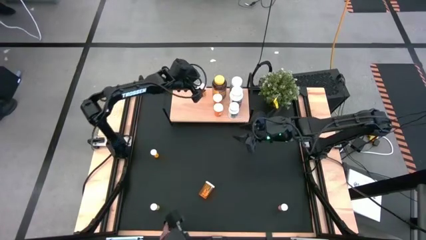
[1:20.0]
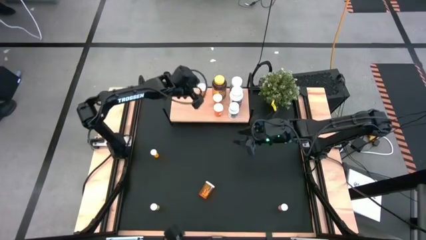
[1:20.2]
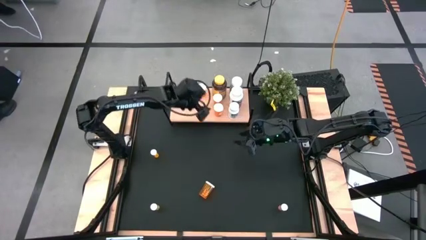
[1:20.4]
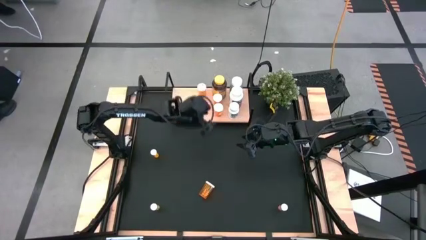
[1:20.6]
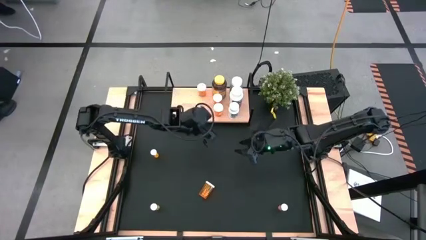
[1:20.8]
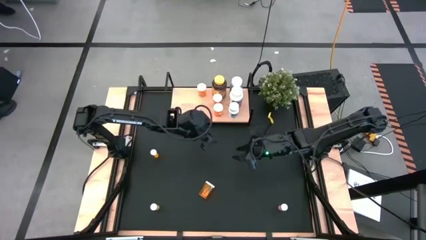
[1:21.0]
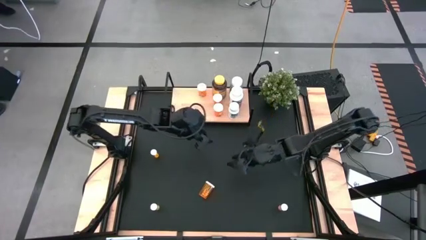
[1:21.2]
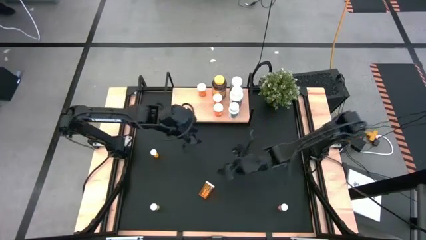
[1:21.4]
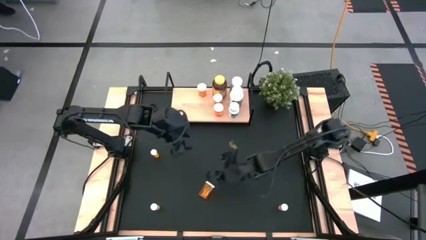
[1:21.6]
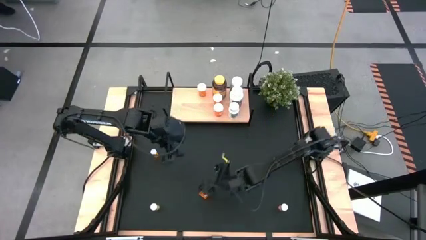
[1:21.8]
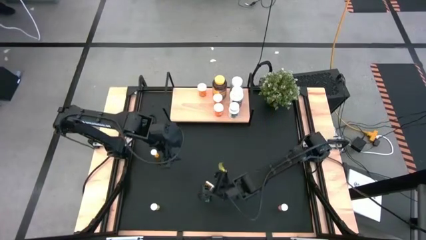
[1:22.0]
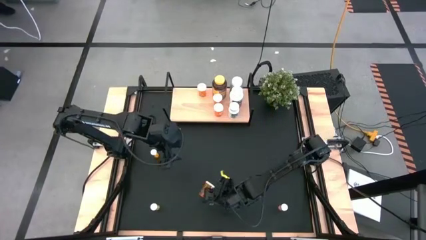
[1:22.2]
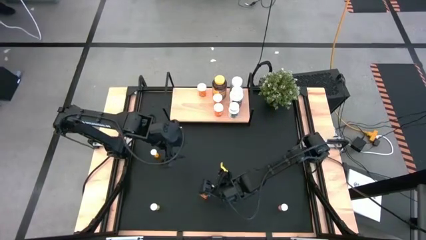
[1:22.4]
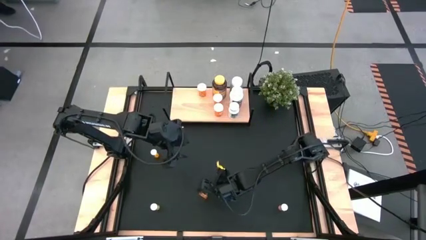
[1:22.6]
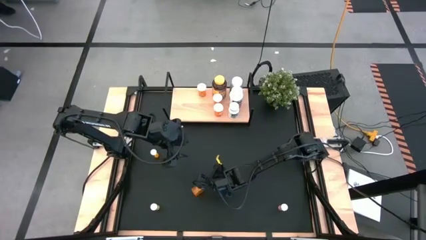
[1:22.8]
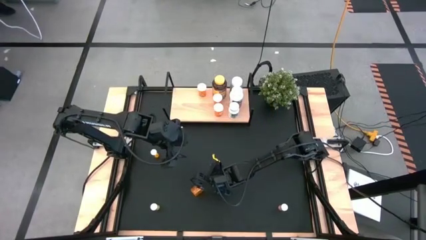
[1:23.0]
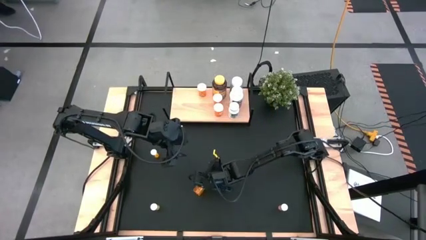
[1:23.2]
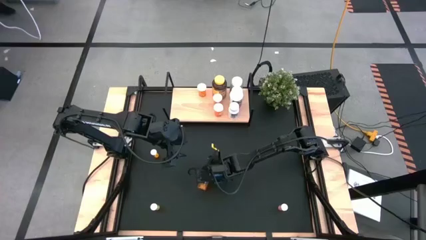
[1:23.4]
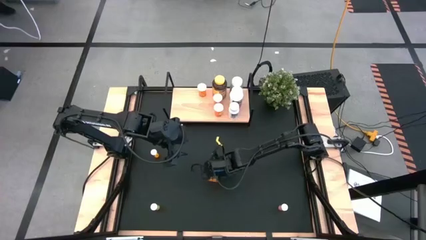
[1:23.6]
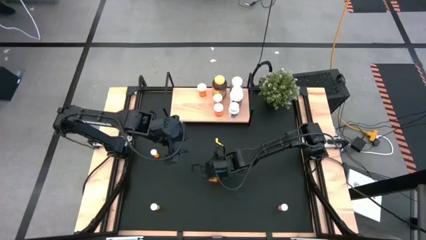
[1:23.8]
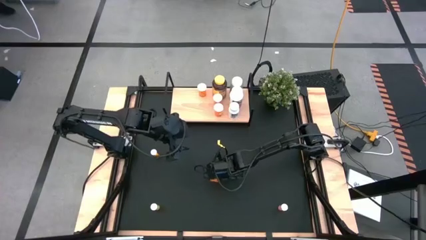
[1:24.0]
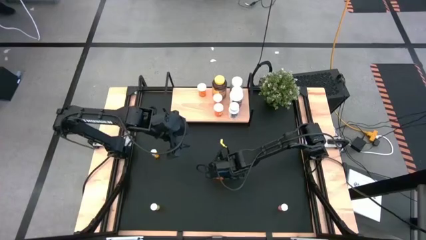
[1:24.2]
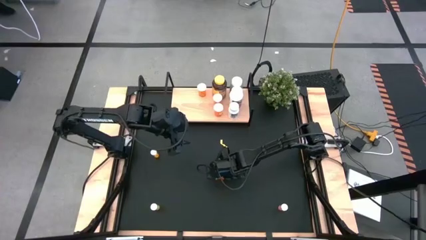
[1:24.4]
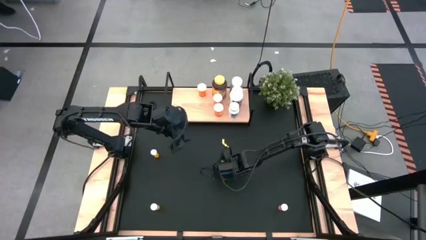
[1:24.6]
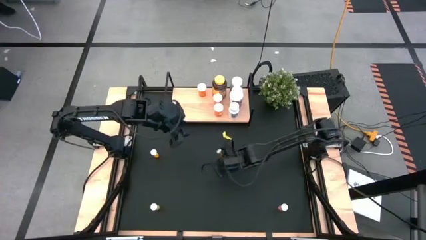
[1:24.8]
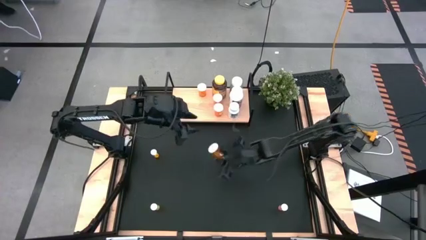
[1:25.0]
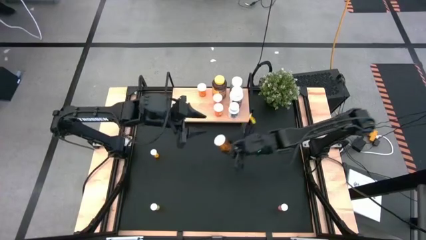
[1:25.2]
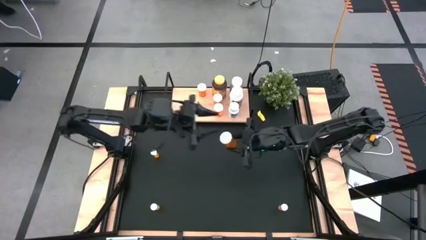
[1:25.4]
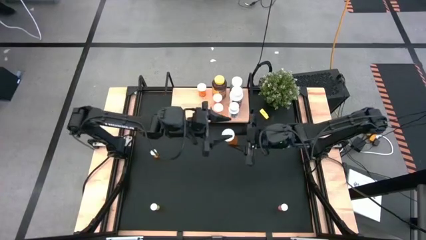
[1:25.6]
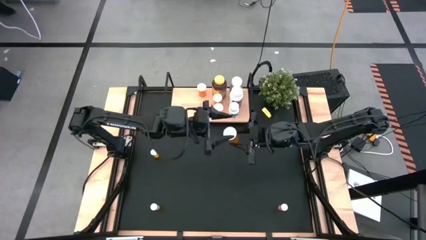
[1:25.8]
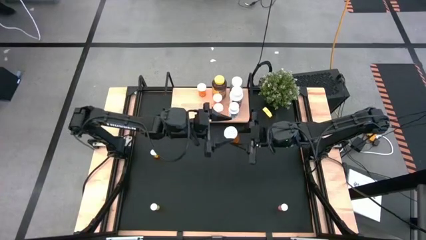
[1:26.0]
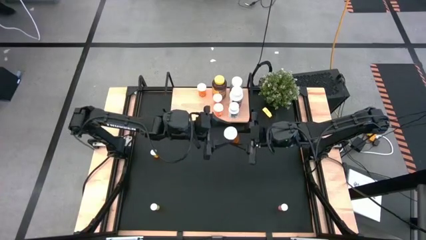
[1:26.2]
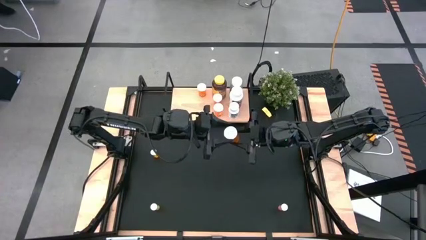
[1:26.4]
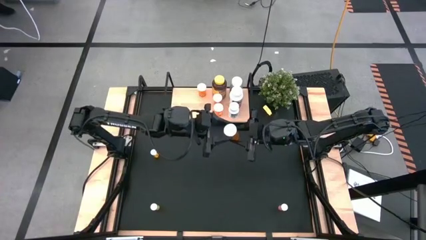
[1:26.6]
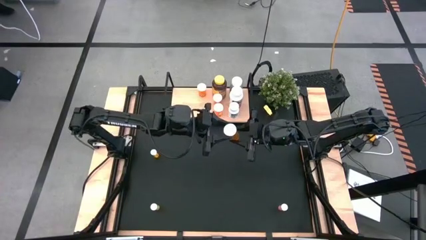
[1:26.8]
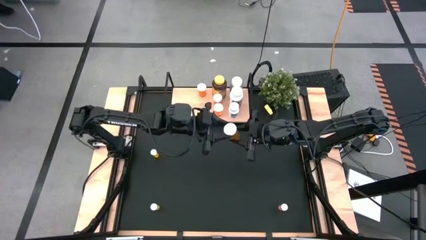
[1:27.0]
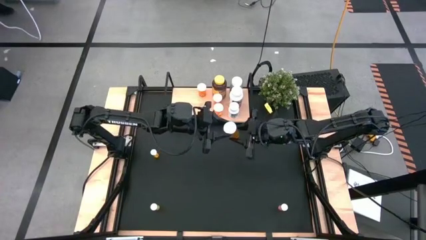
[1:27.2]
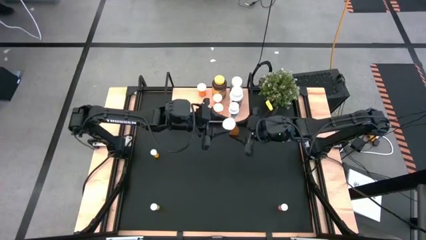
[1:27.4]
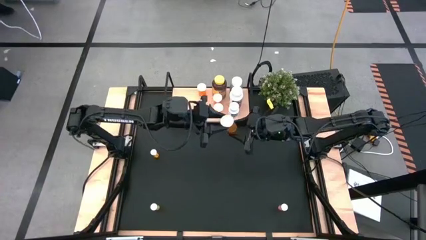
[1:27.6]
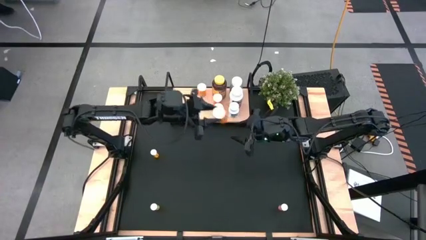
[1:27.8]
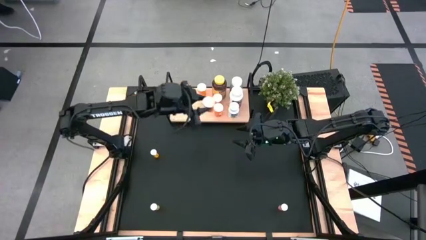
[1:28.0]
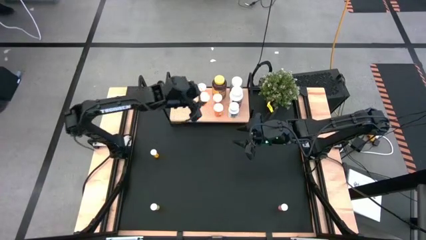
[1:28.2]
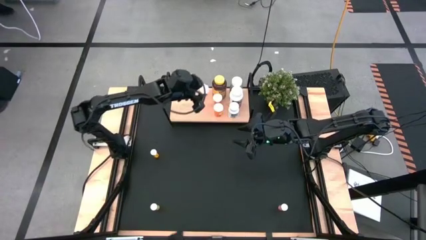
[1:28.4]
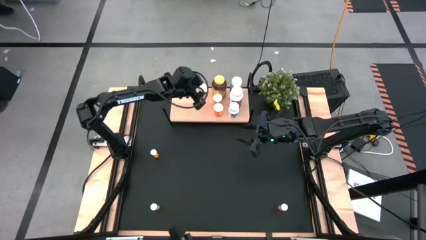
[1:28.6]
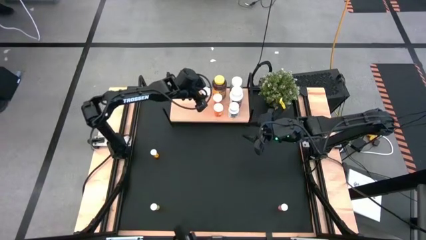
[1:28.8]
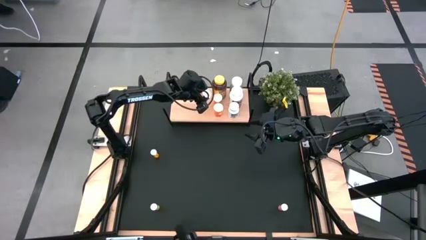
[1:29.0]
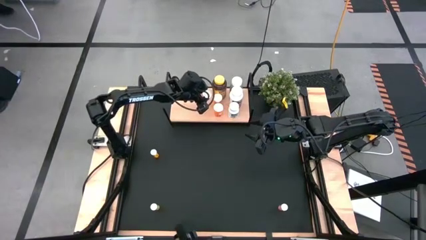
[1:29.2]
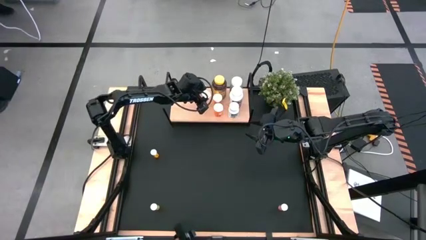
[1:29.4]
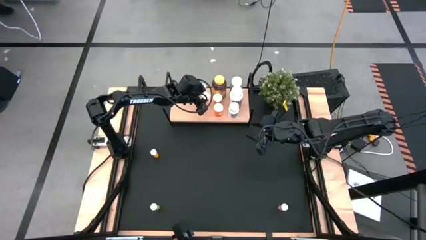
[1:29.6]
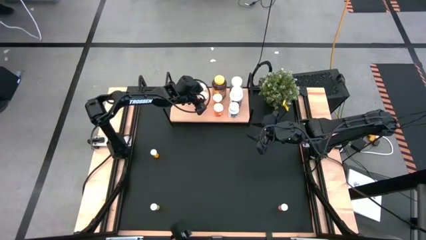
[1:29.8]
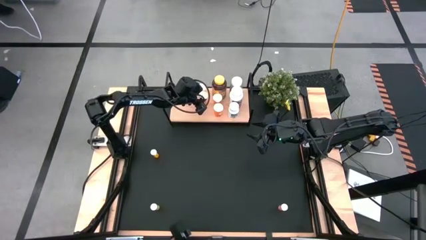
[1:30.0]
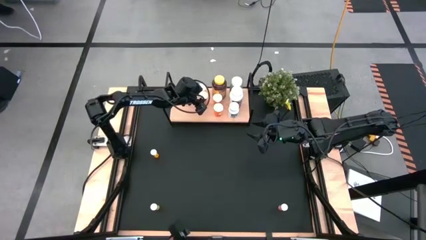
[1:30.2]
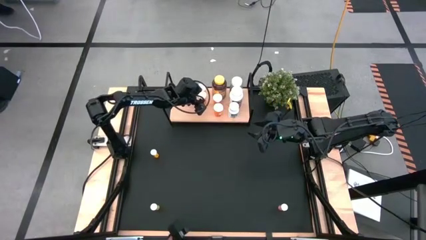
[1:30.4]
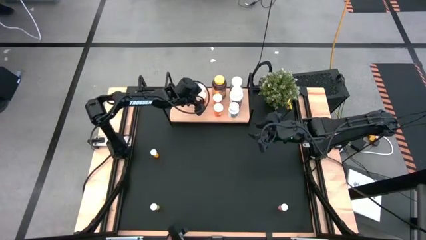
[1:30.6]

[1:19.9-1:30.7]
Task: Pick and place medicine bottles onto shelf by color
Put the orange pill bottle on the shelf aligned with the other orange pill bottles

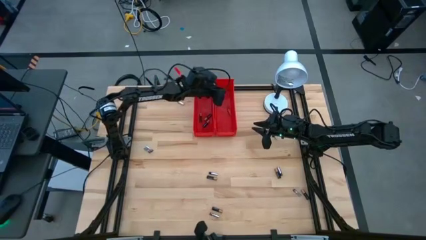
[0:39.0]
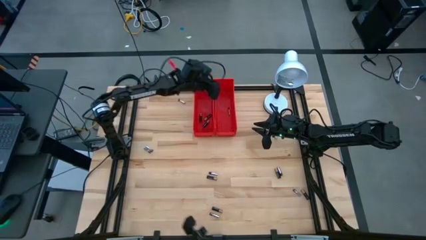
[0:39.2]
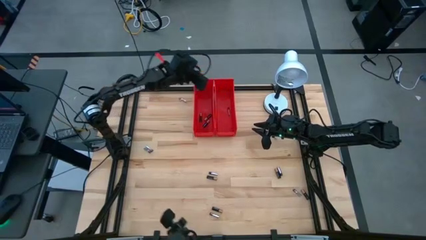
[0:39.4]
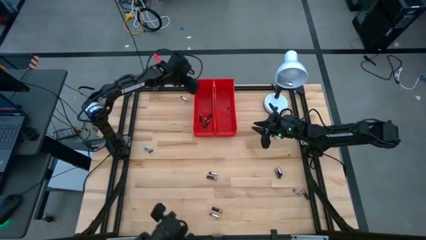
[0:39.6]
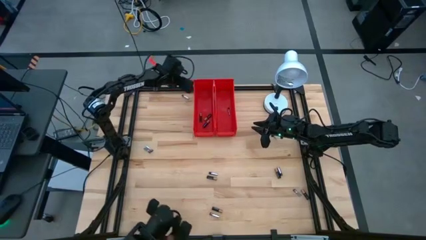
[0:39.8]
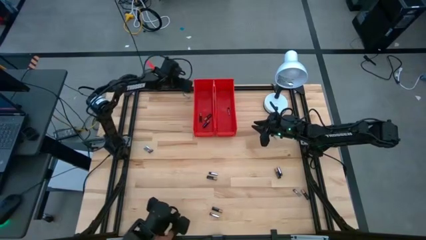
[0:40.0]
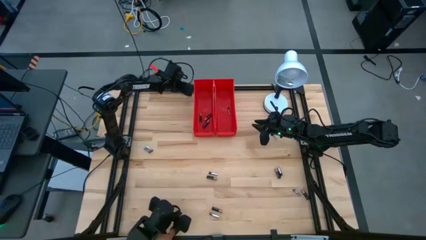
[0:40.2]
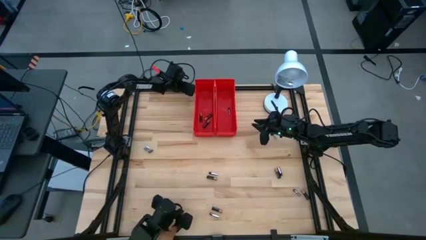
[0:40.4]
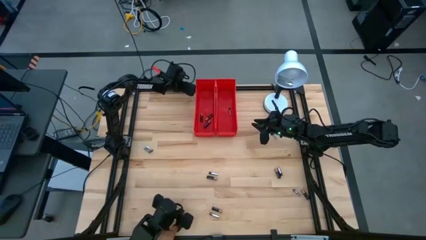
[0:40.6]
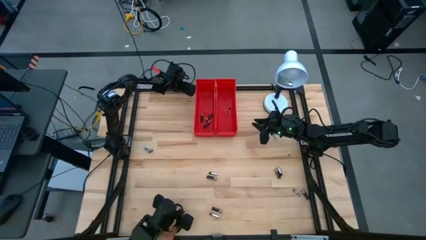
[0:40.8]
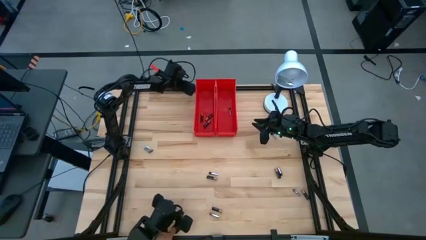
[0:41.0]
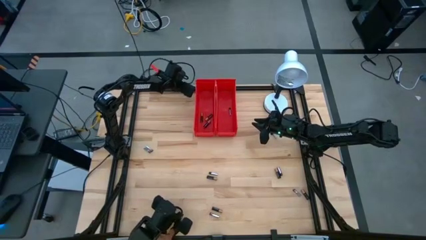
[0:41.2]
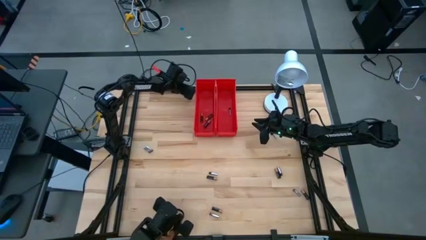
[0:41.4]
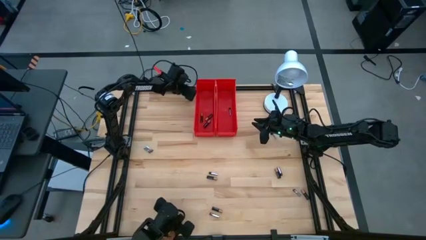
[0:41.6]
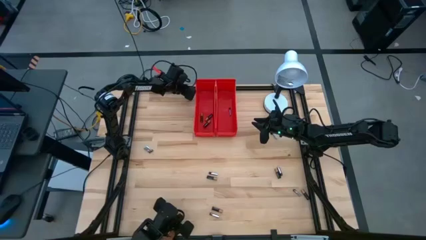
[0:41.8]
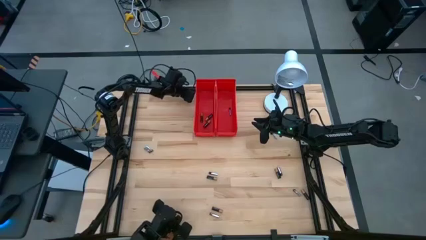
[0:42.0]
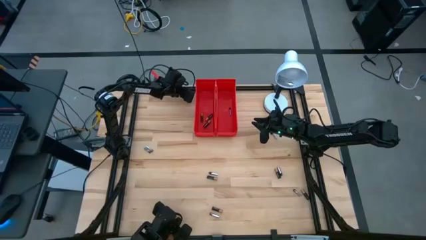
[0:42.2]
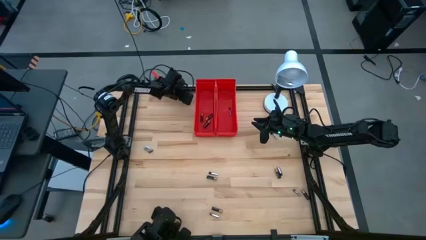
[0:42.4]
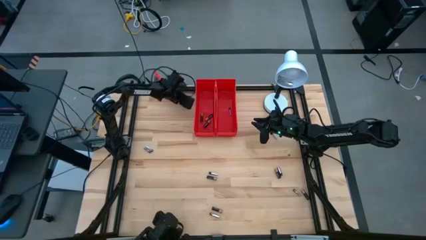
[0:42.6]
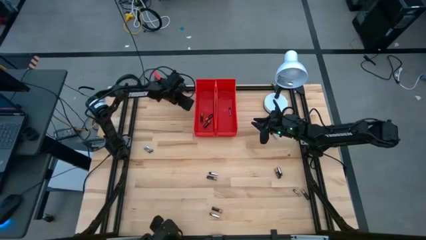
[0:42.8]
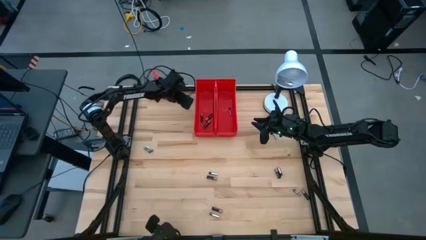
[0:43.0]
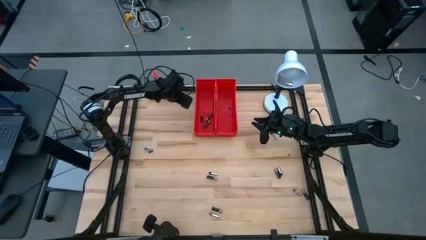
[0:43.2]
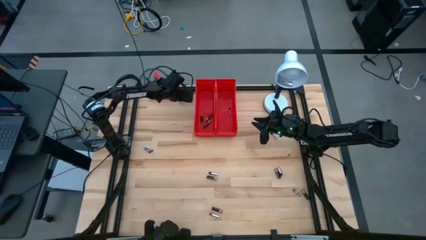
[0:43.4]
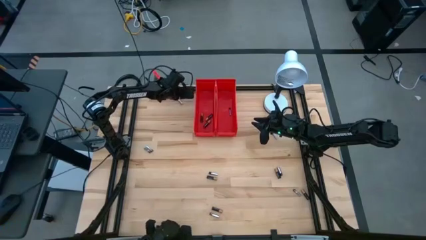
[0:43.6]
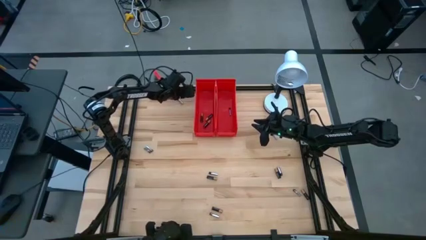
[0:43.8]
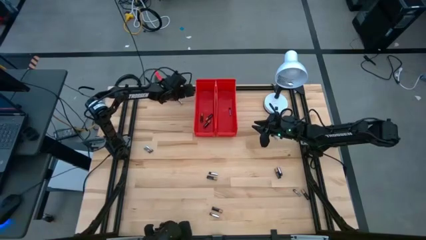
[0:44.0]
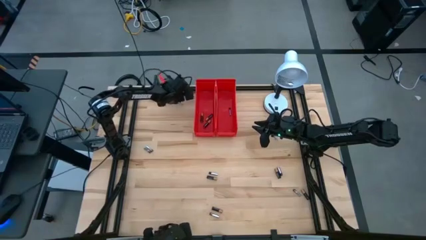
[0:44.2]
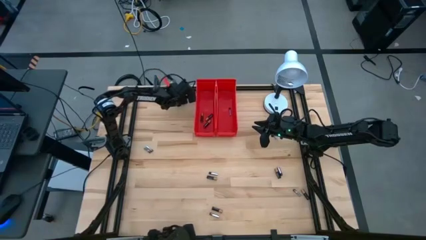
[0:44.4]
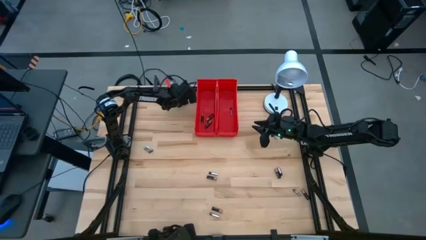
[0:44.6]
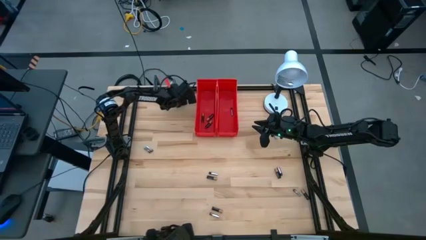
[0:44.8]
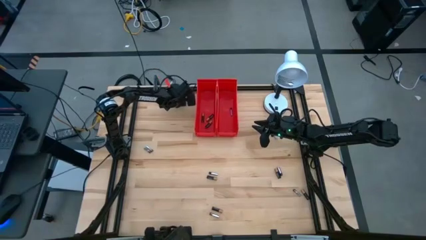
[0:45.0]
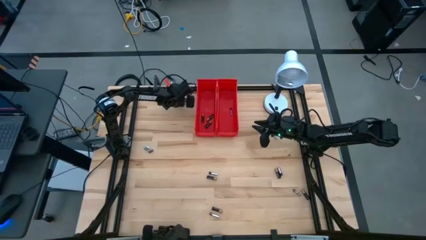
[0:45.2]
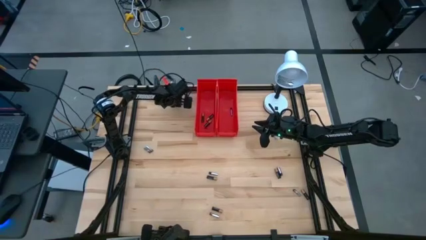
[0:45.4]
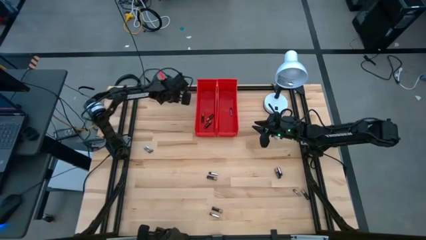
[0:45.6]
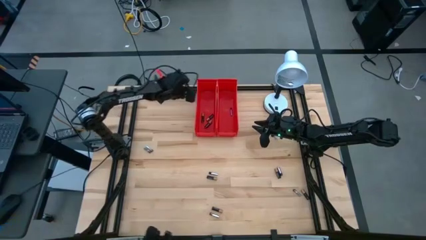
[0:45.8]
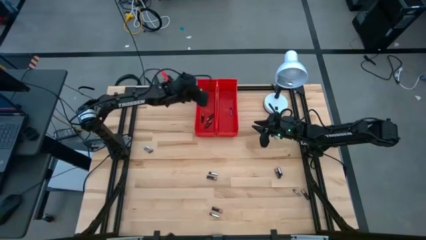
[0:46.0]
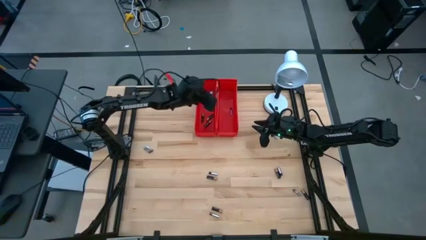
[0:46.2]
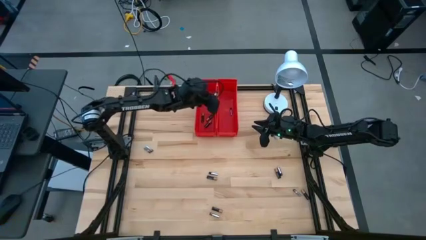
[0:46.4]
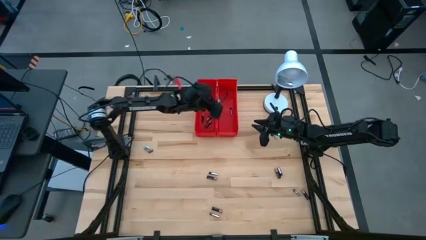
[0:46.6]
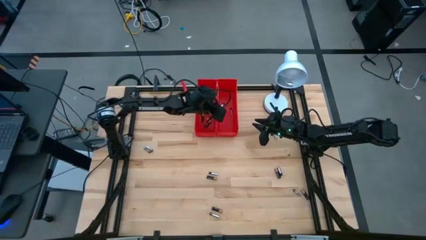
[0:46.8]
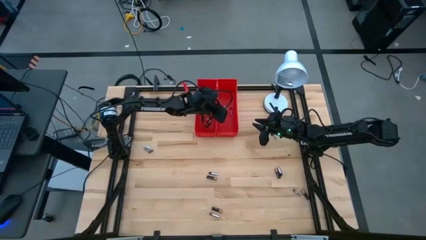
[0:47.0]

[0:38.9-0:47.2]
Task: Sort batteries
Put the silver battery into the right red bin
